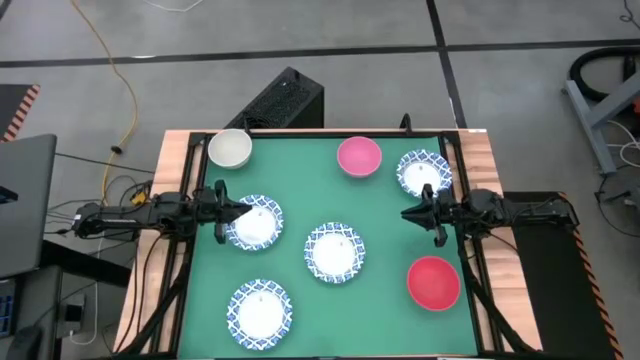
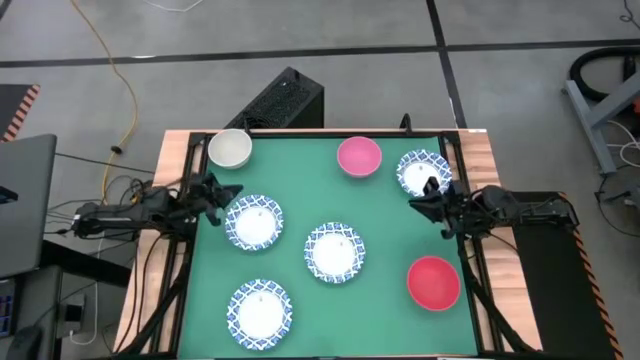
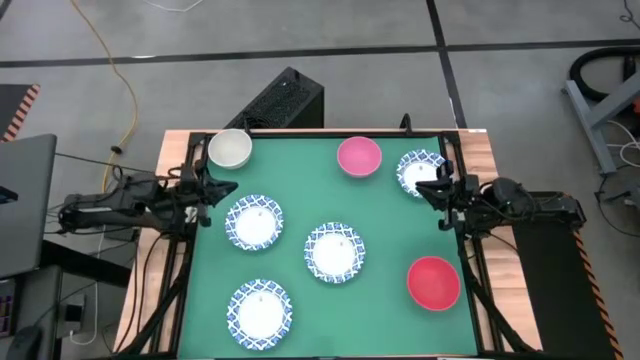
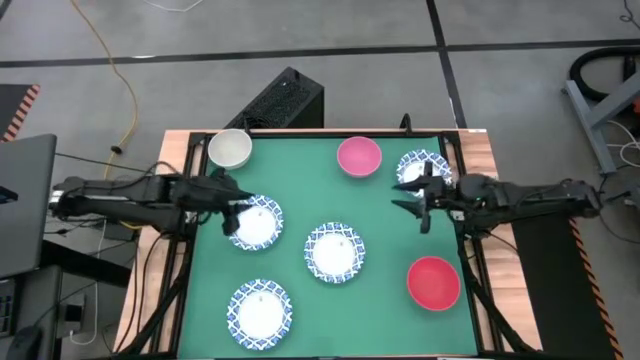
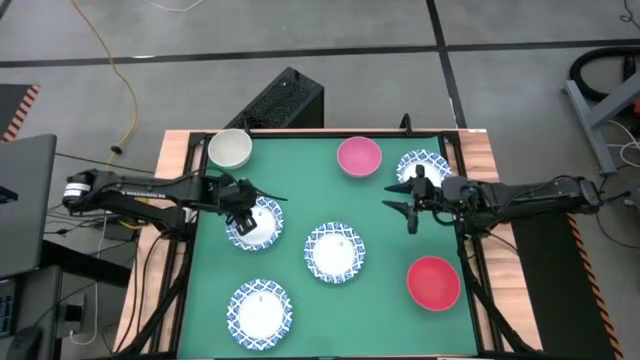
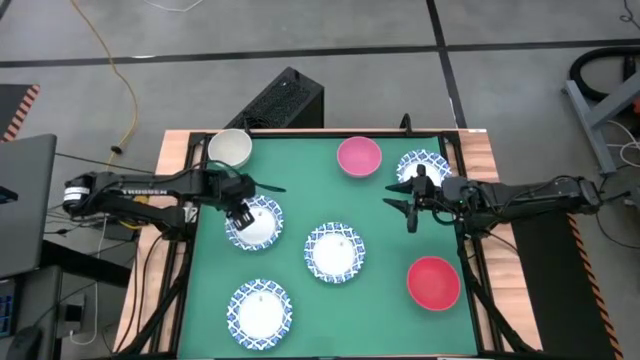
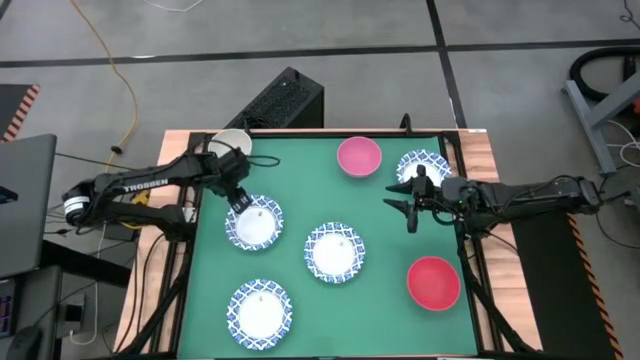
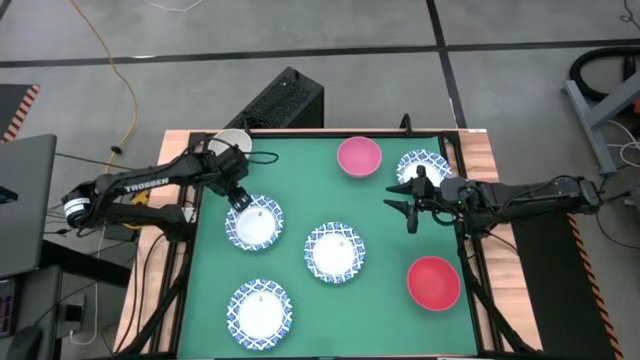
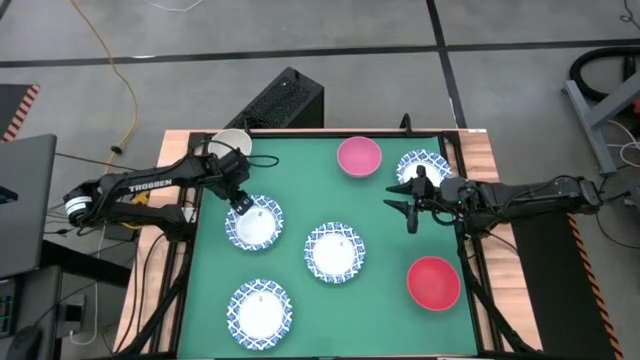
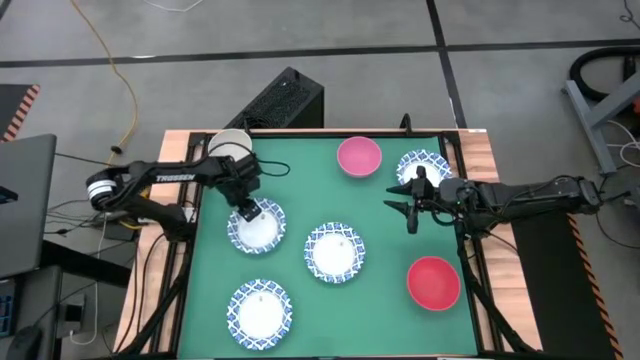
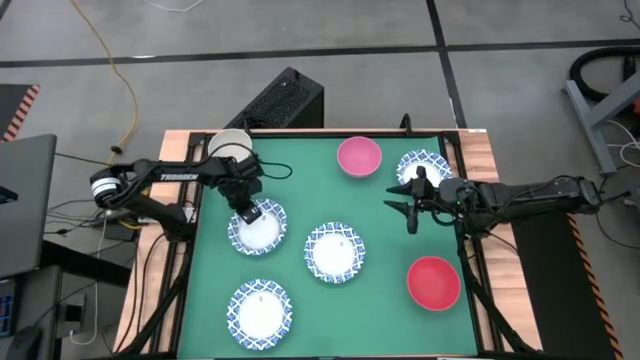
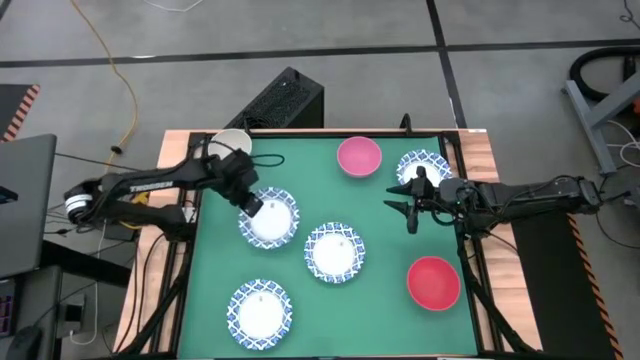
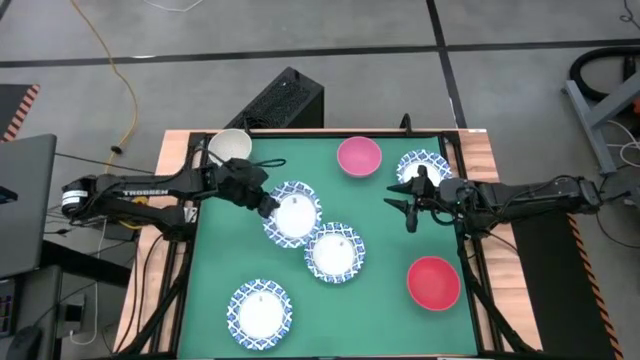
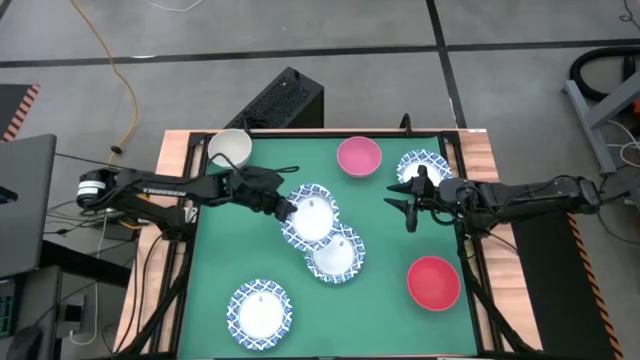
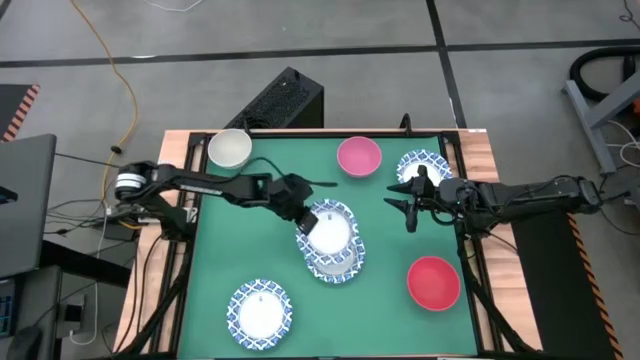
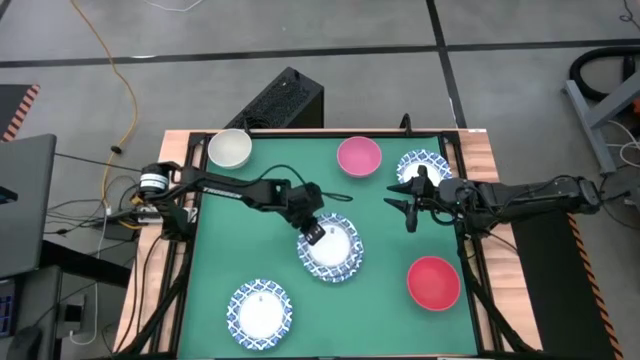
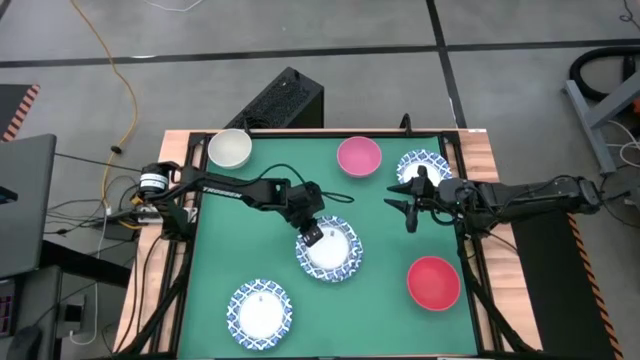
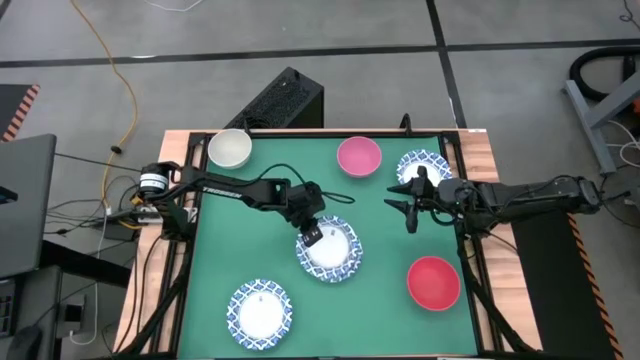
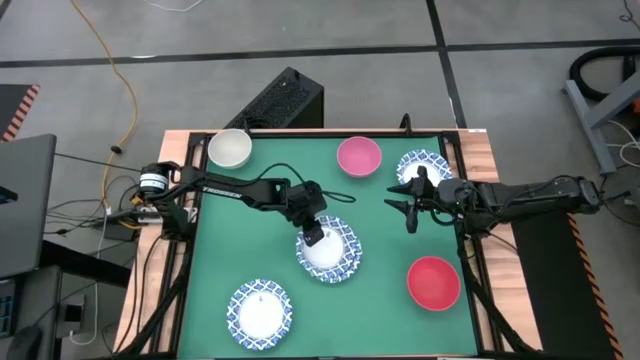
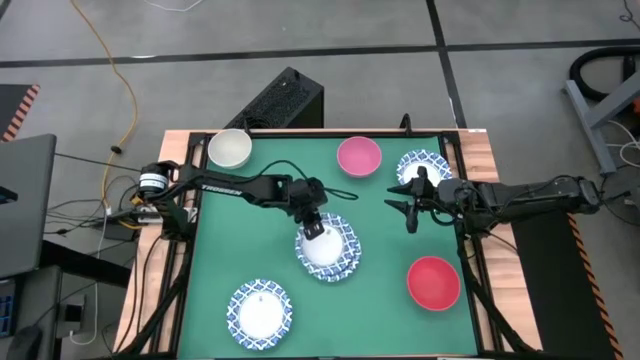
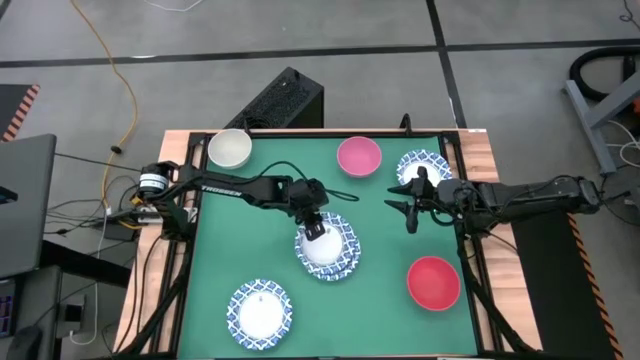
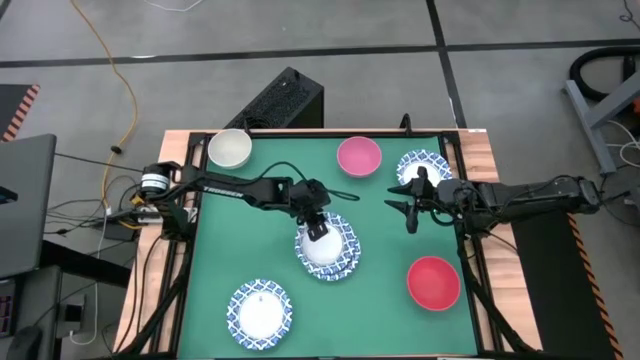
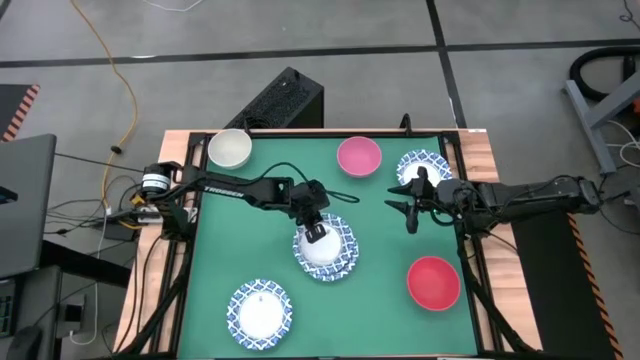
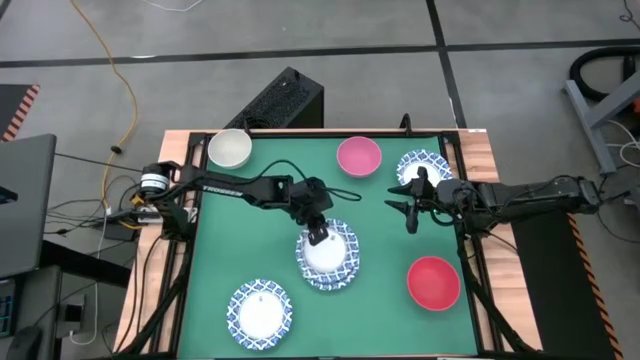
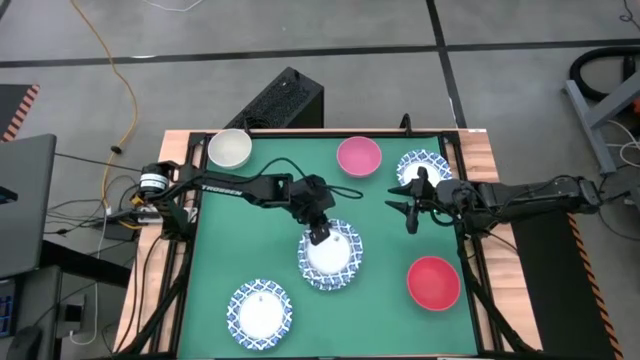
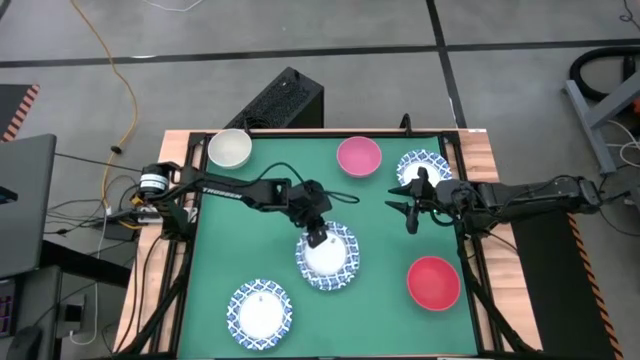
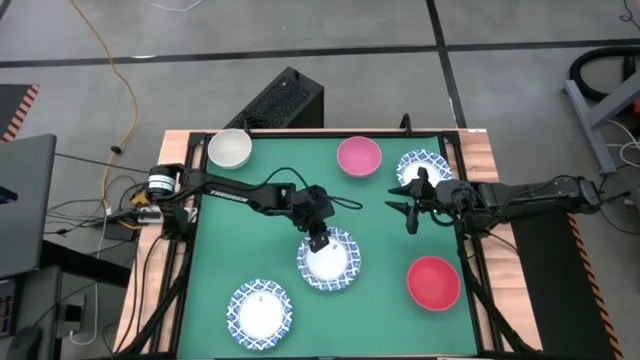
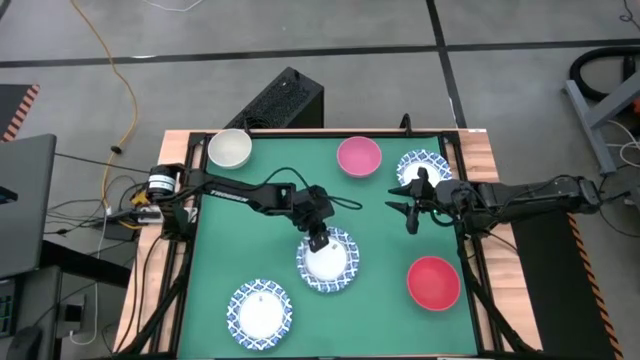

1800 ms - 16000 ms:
Stack the white with blue patterned bowl on top of the white with blue patterned bowl
